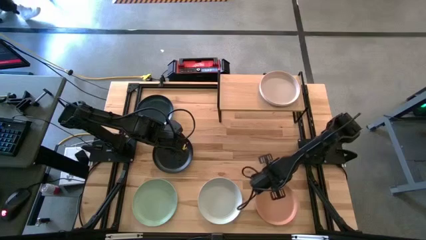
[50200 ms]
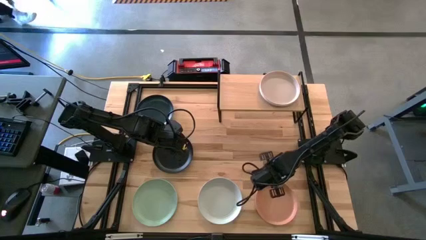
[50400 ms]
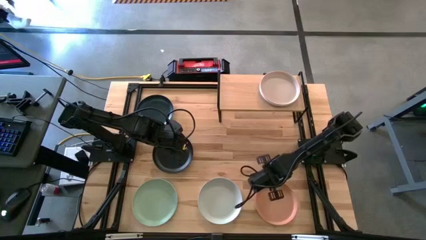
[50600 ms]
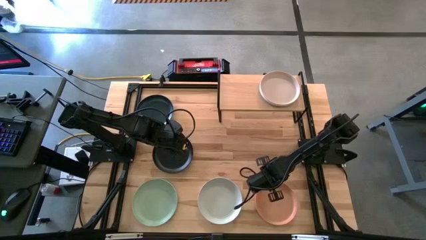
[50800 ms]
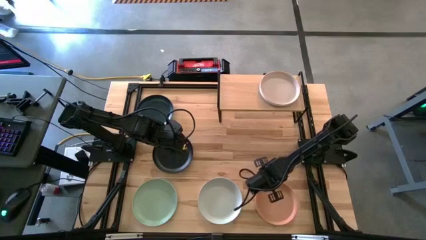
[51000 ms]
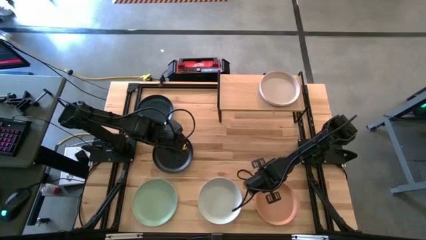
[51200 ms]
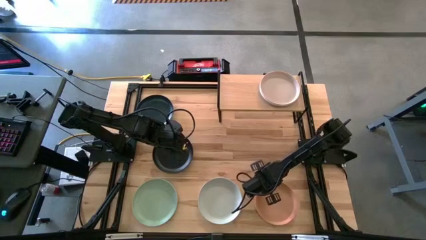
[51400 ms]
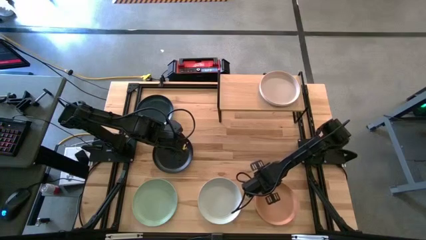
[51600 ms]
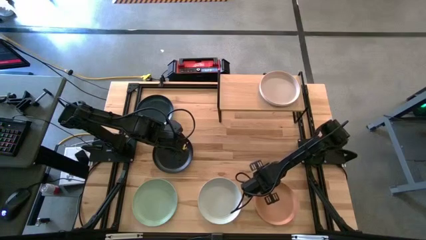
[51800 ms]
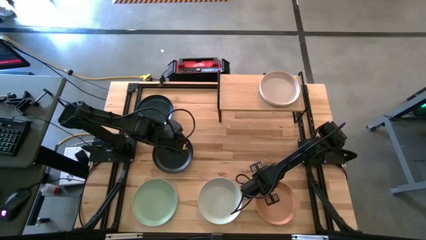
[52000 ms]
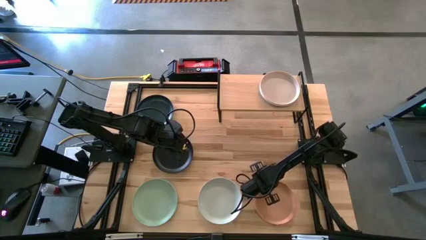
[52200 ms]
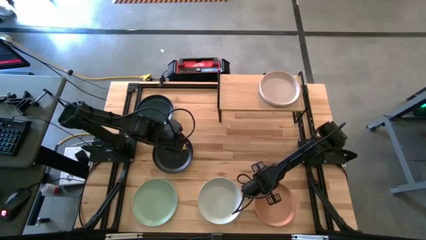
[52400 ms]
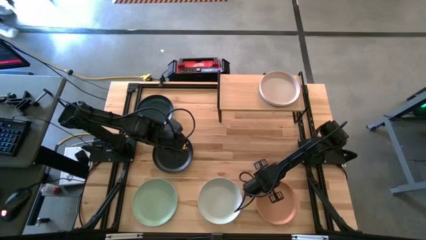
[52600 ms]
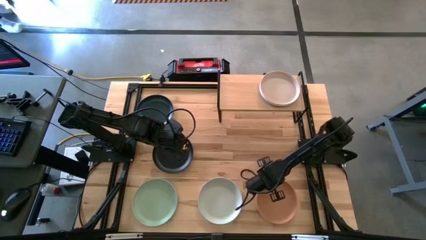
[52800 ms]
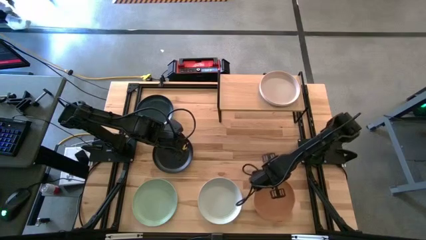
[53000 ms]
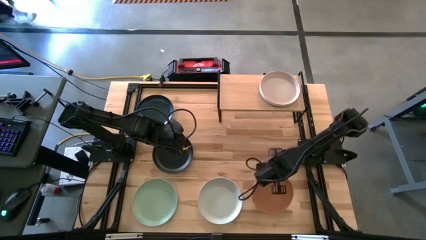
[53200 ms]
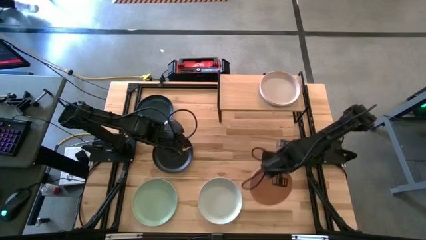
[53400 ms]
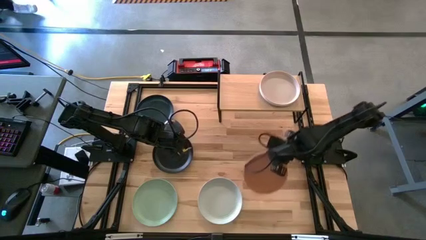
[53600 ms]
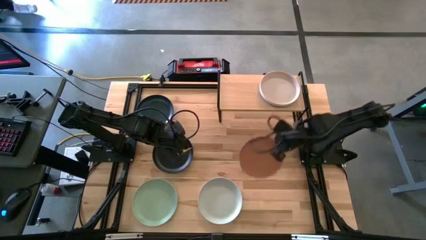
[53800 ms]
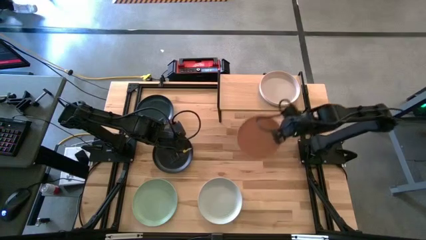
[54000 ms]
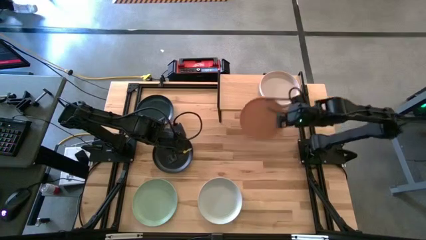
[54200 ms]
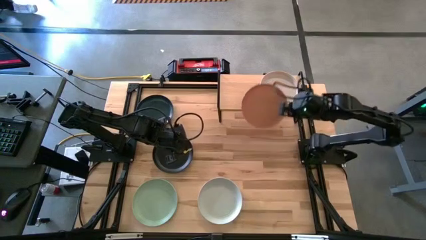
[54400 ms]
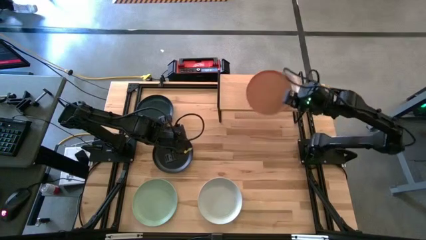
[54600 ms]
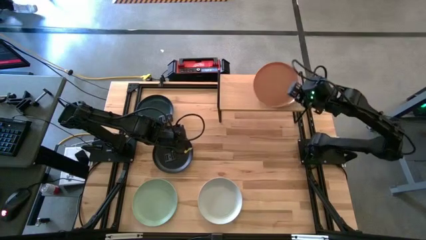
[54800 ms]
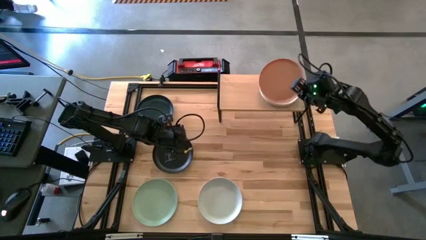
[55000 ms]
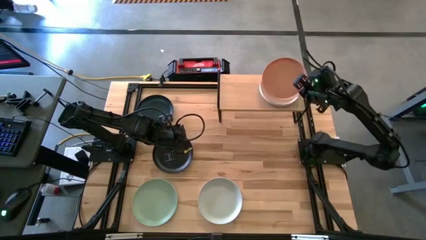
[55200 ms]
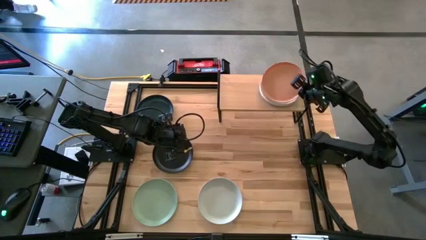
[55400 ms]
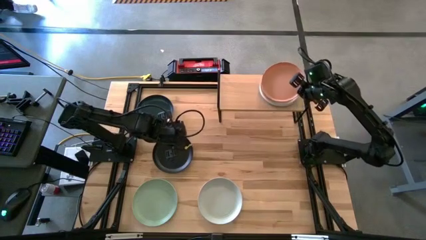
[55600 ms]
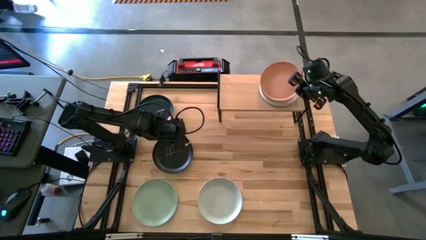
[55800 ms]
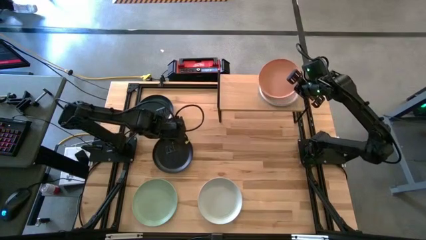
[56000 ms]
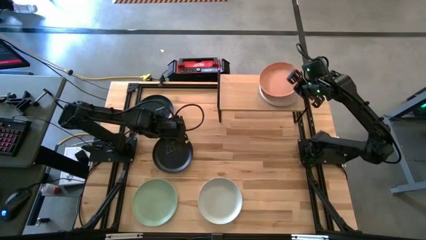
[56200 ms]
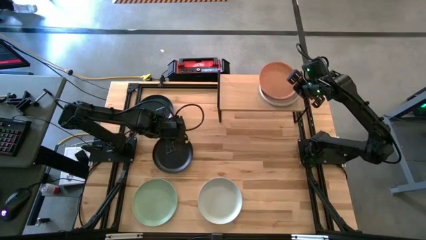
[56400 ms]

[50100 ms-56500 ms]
Task: Place and stack plates onto a shelf
Stack the orange plate on top of the white plate on the shelf

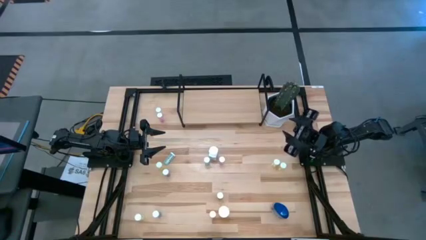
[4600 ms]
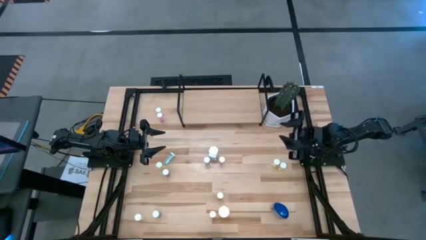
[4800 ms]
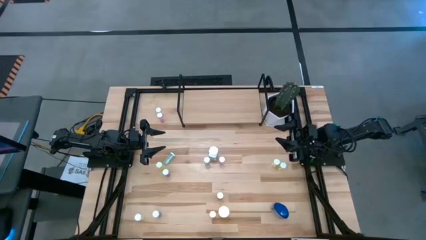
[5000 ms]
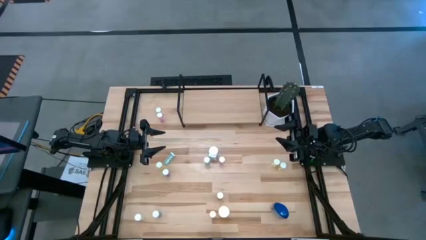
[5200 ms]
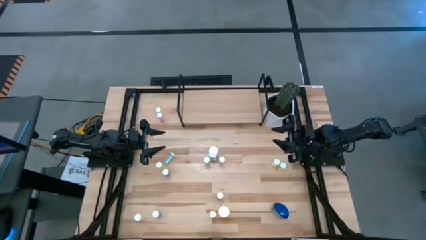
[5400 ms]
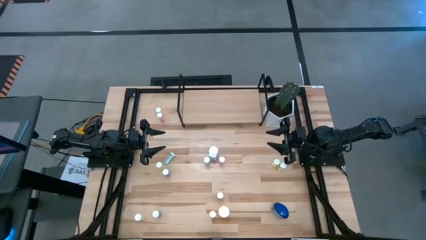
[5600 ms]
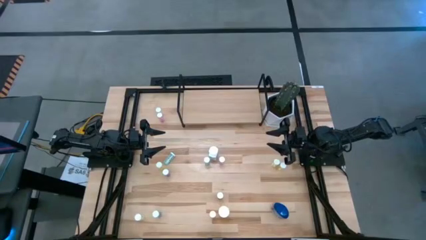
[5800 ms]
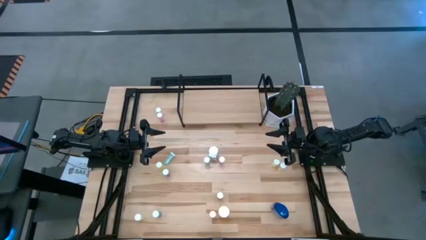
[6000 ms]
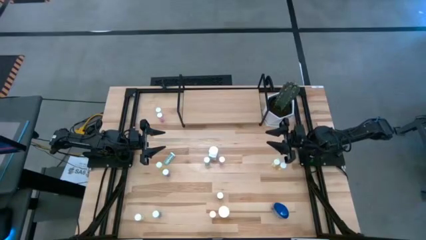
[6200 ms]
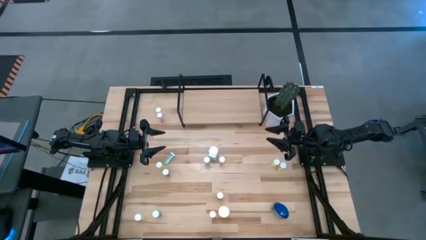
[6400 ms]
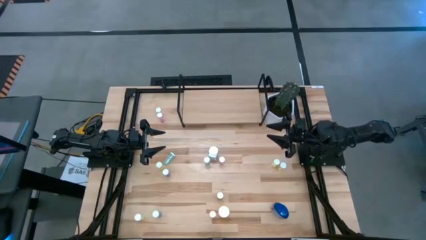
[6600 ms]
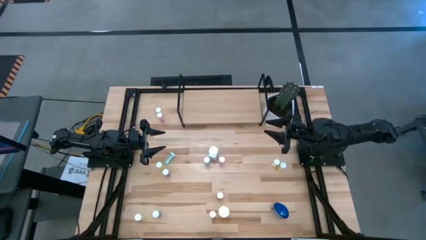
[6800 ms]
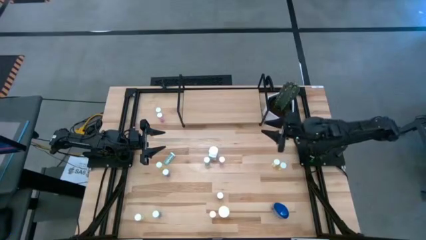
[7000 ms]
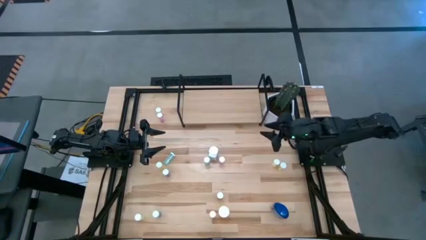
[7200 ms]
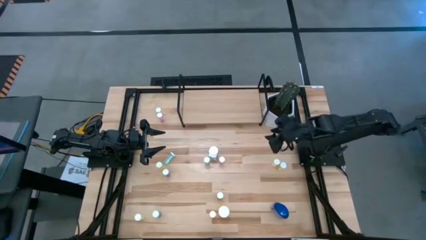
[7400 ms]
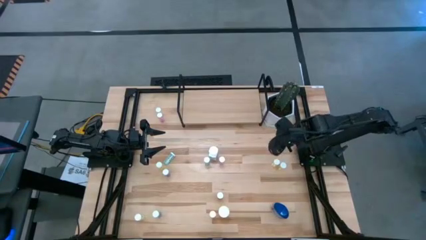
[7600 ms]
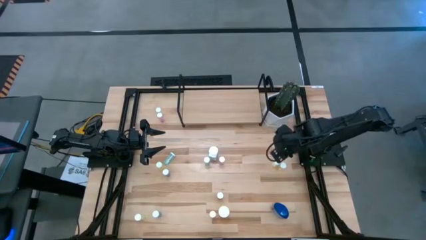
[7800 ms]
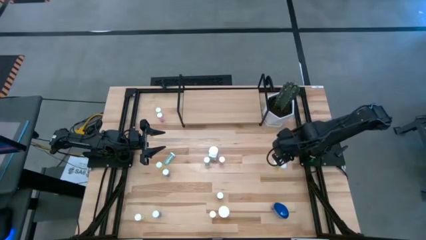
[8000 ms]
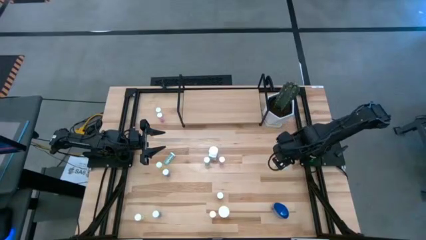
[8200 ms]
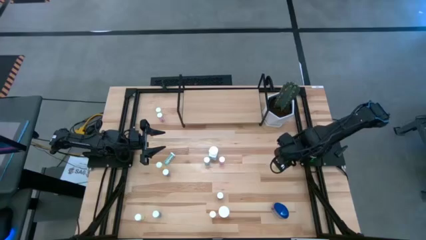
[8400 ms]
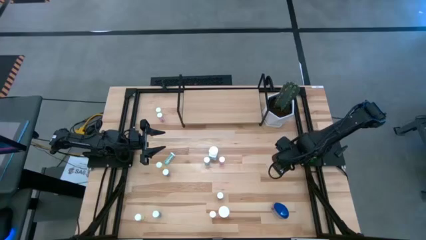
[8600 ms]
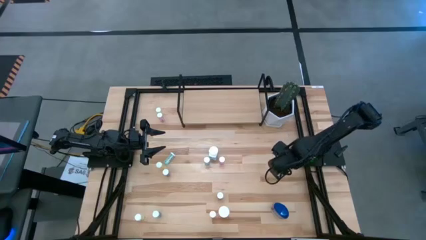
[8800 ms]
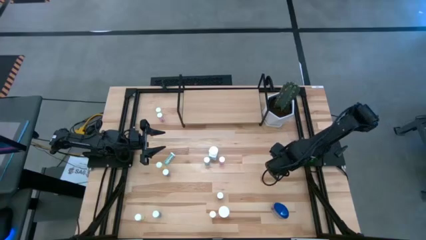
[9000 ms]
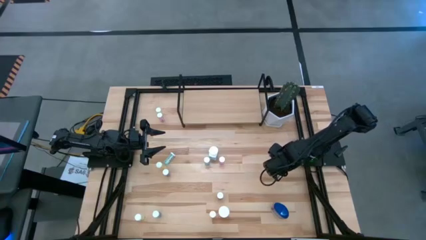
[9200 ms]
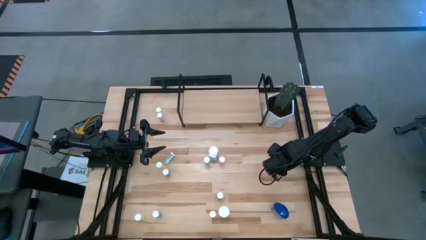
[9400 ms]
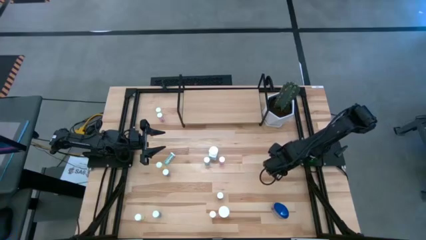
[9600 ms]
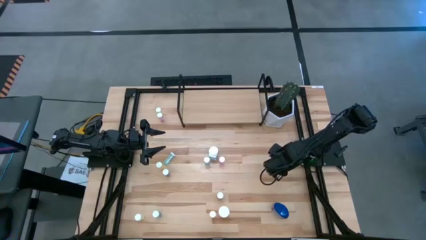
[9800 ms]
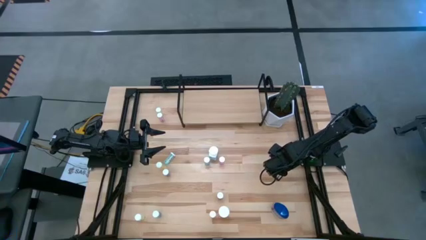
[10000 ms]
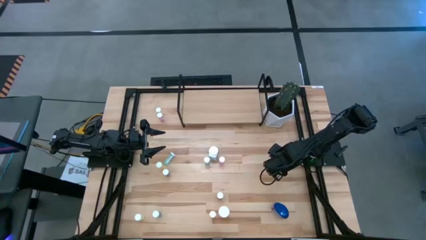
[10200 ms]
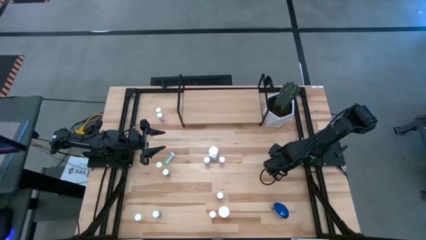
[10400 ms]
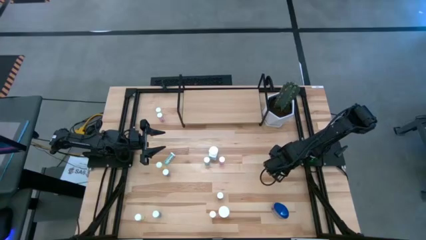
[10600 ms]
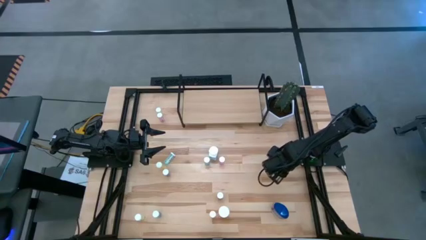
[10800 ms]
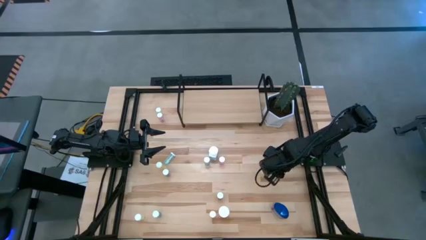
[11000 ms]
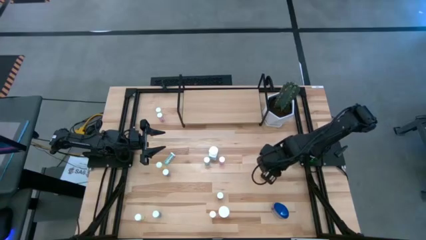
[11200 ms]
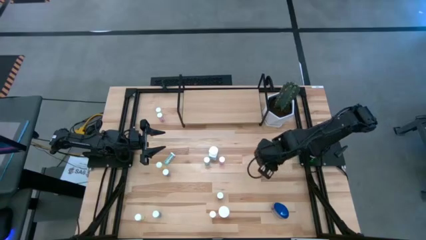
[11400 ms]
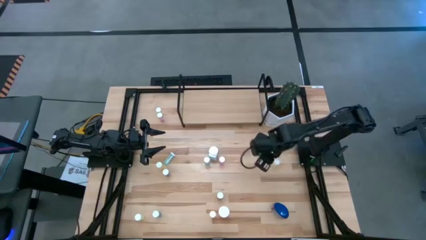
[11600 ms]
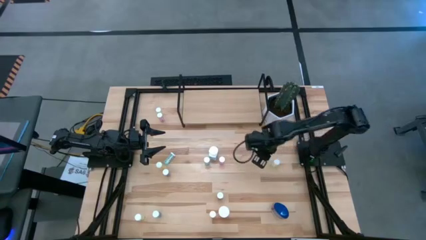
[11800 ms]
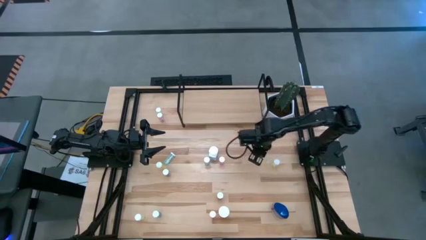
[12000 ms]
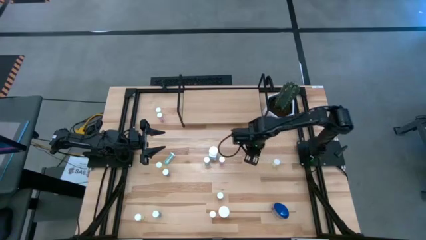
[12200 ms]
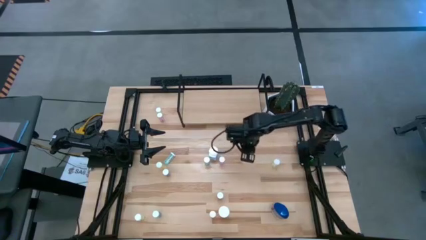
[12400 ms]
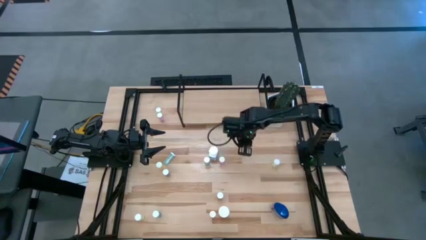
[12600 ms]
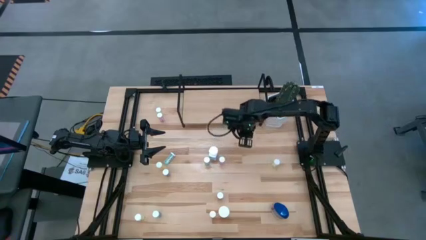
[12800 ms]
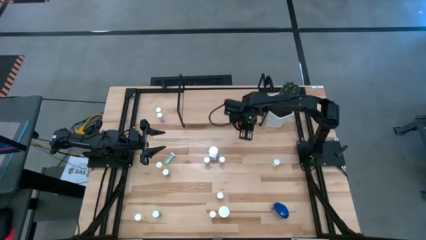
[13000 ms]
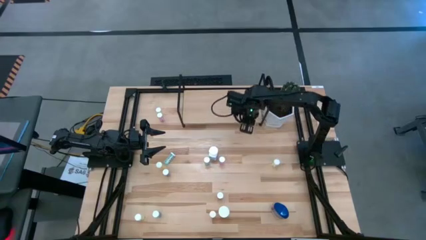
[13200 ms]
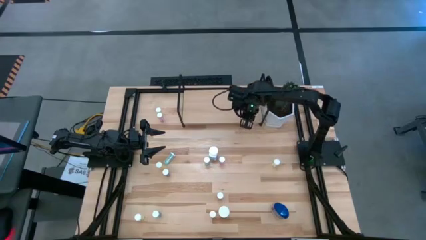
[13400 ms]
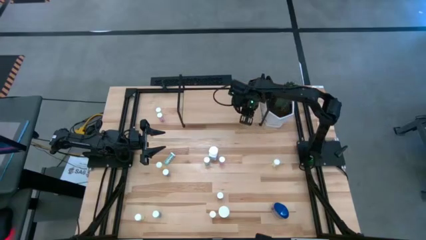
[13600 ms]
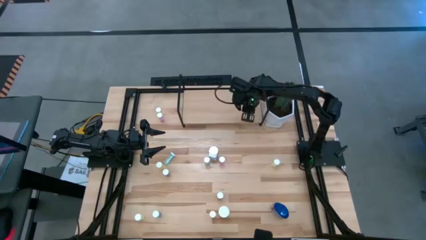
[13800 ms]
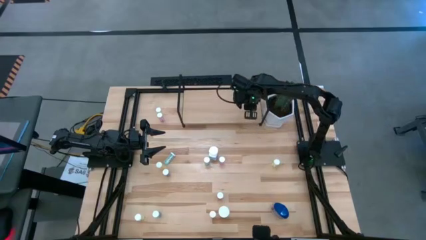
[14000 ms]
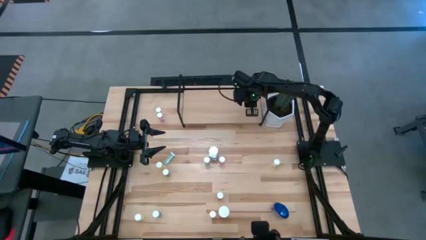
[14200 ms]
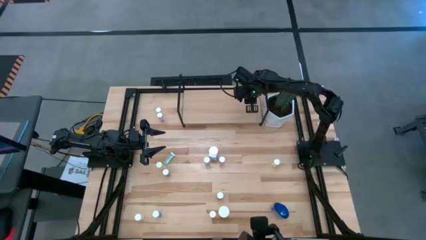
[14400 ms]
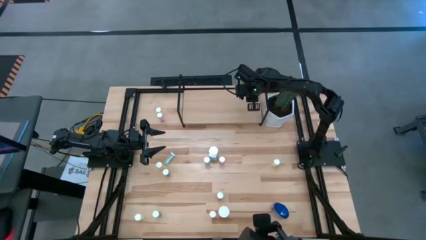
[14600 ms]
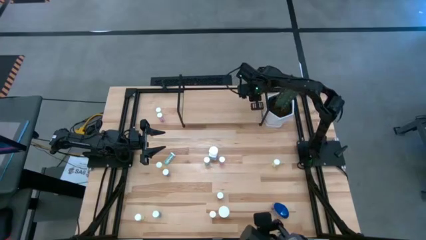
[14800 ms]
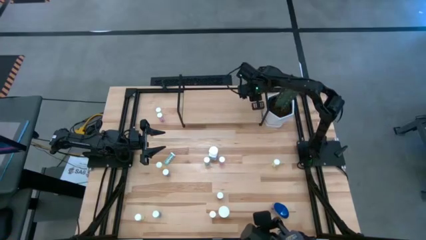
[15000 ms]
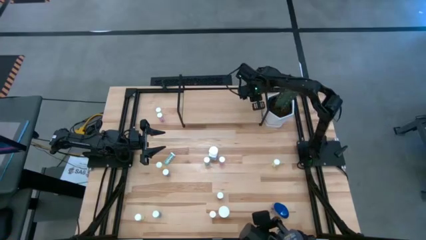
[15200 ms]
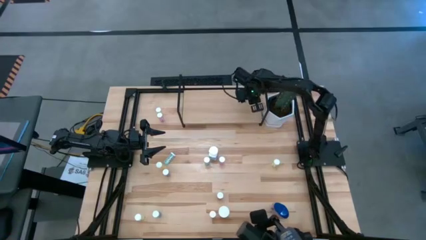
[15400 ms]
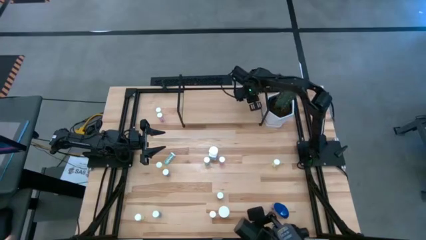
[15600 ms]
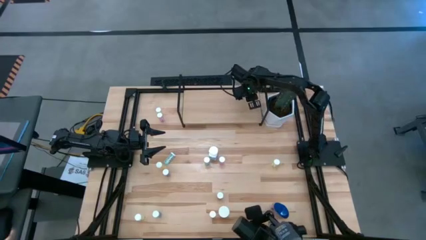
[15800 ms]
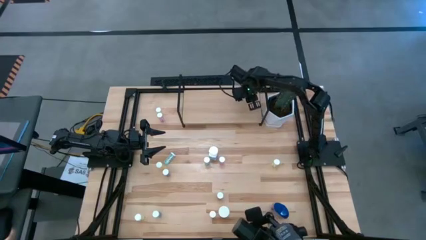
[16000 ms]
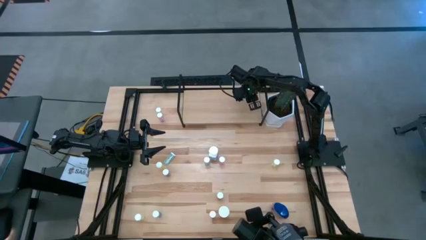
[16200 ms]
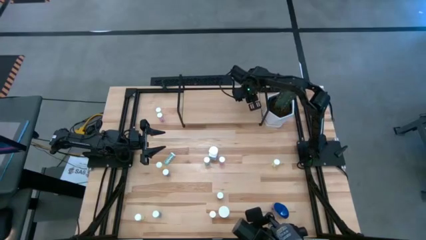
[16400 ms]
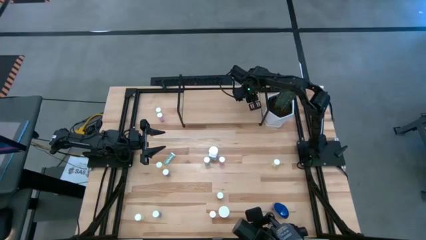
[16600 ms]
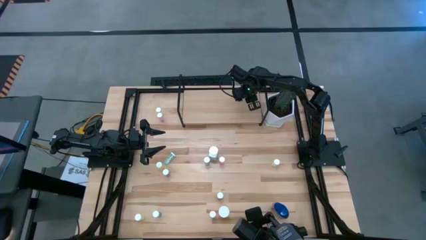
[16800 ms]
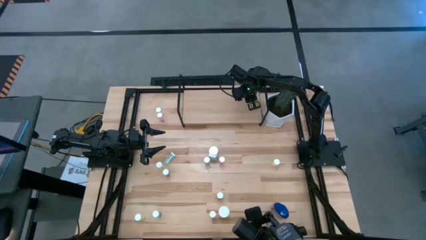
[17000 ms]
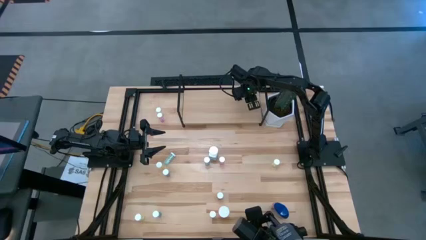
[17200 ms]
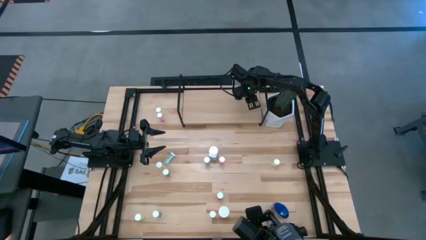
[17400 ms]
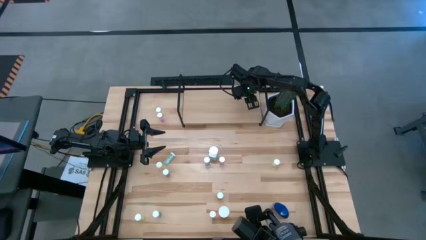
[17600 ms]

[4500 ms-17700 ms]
Task: Pick and place medicine bottles onto shelf by color
Put the yellow pill bottle on the shelf
